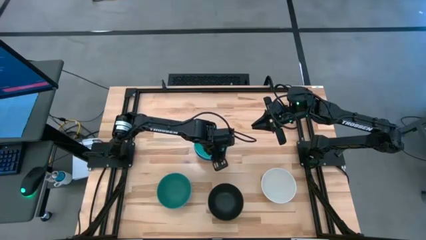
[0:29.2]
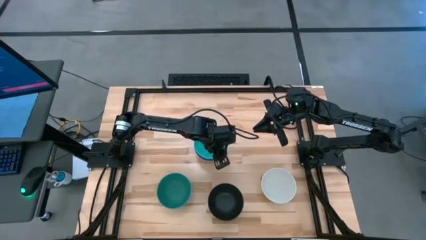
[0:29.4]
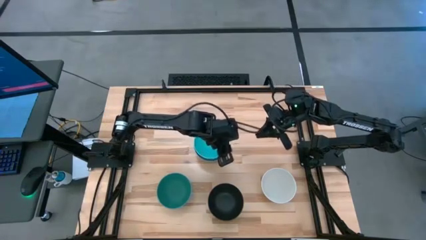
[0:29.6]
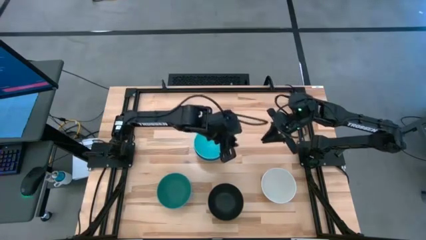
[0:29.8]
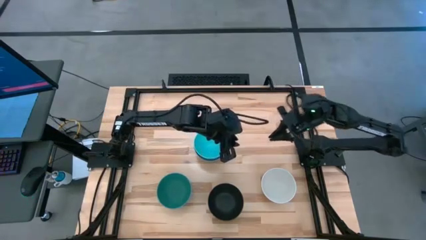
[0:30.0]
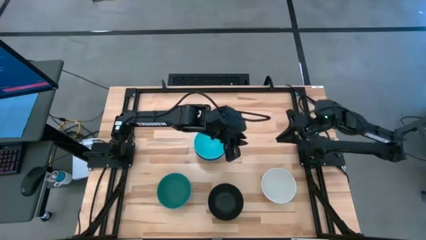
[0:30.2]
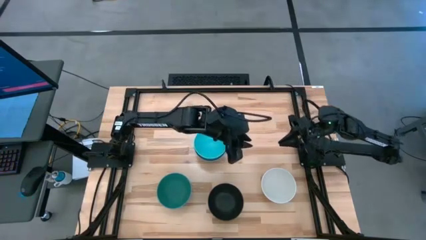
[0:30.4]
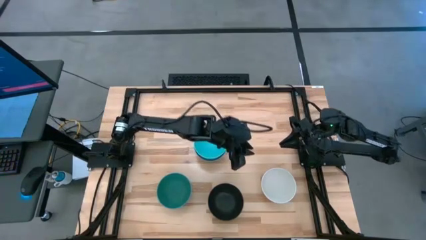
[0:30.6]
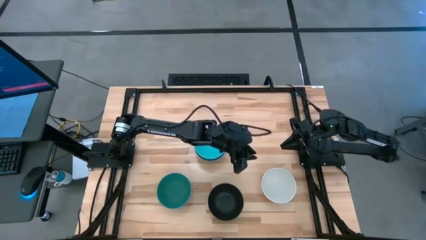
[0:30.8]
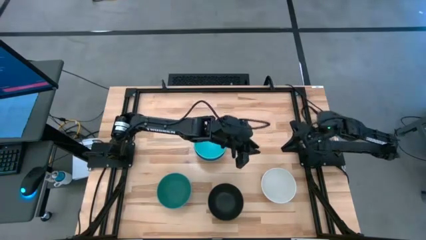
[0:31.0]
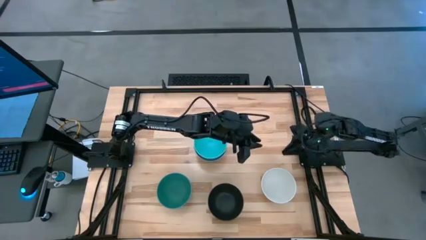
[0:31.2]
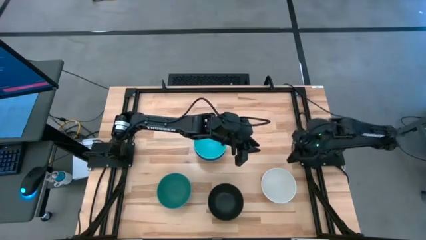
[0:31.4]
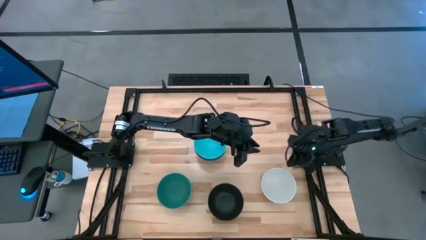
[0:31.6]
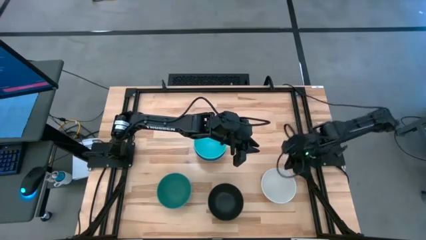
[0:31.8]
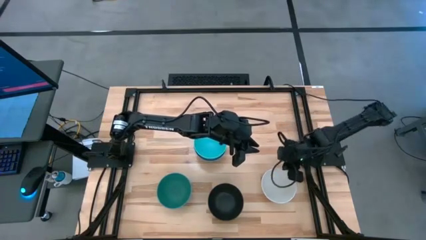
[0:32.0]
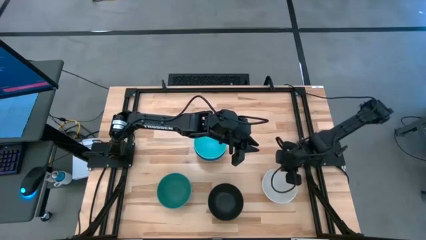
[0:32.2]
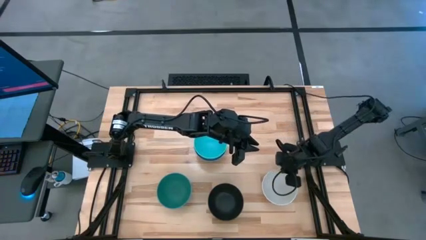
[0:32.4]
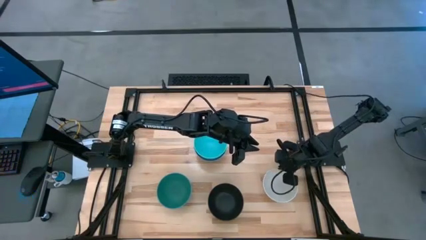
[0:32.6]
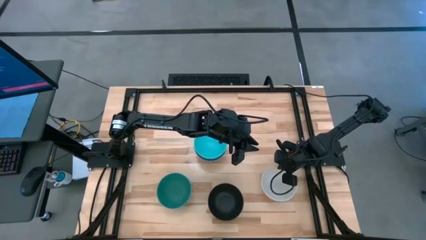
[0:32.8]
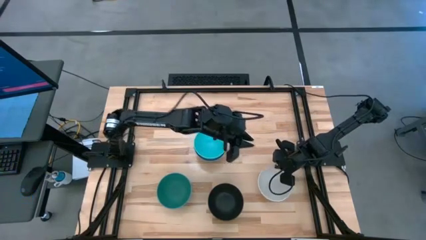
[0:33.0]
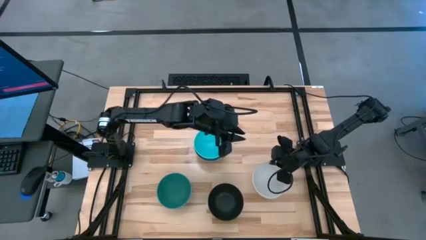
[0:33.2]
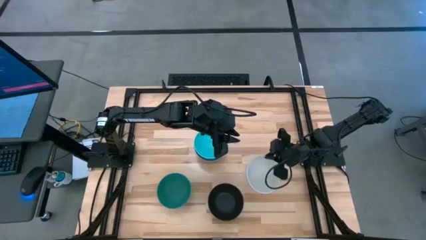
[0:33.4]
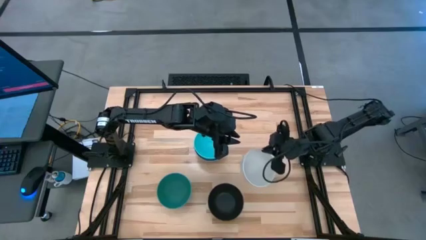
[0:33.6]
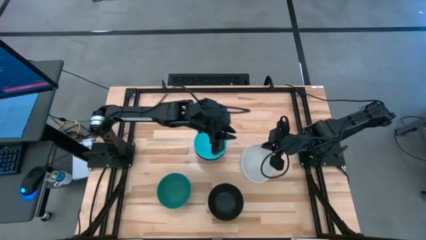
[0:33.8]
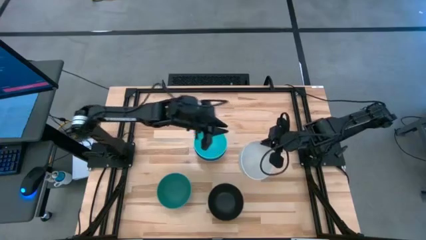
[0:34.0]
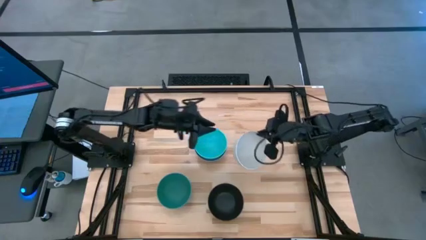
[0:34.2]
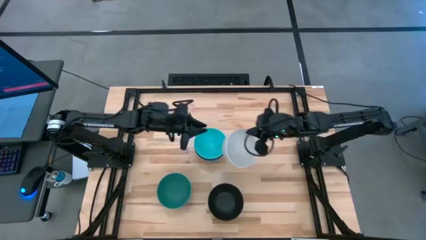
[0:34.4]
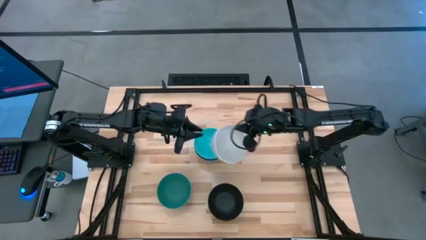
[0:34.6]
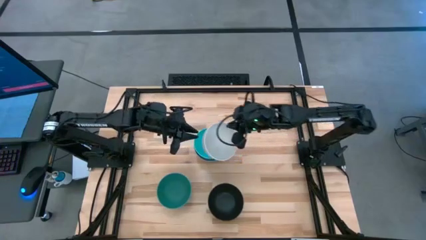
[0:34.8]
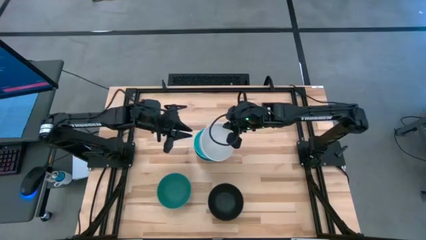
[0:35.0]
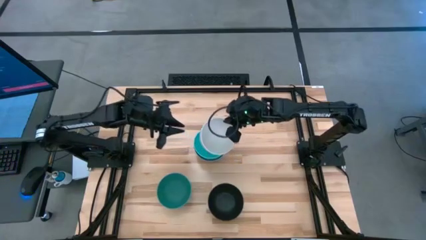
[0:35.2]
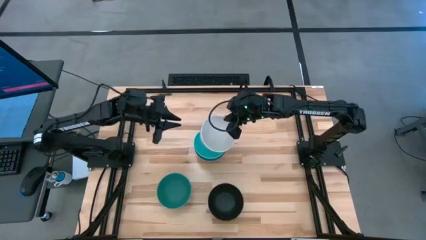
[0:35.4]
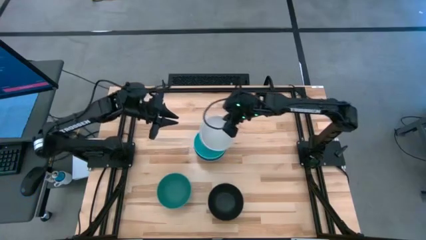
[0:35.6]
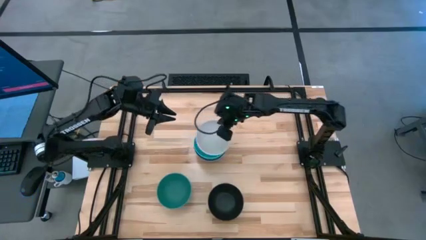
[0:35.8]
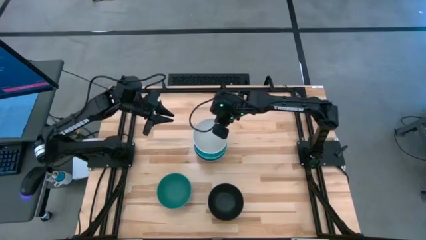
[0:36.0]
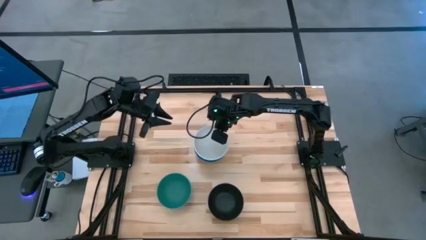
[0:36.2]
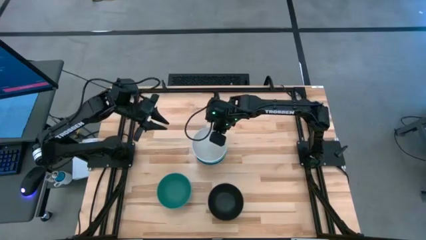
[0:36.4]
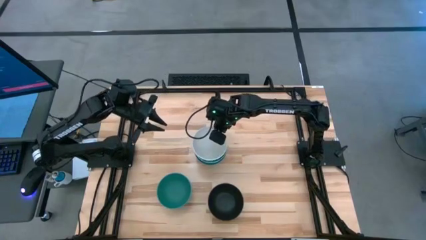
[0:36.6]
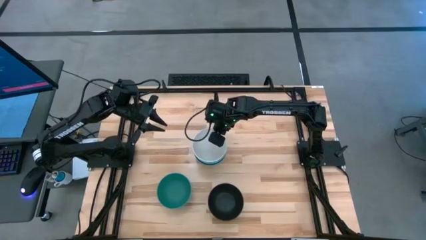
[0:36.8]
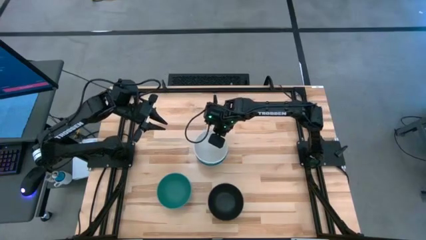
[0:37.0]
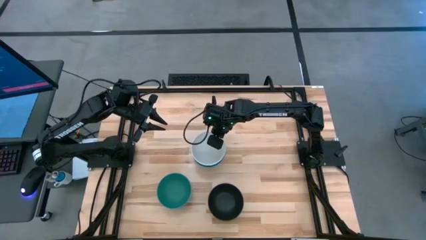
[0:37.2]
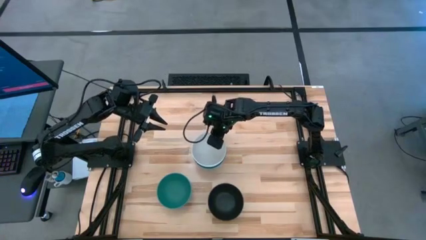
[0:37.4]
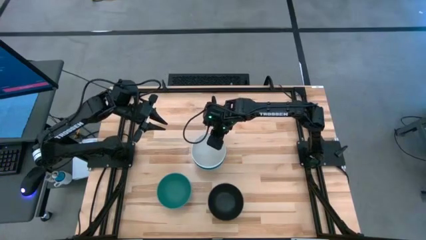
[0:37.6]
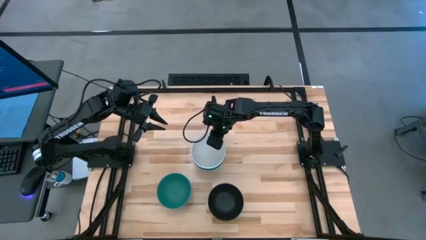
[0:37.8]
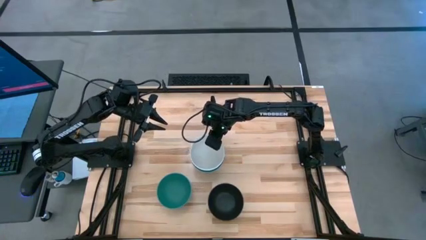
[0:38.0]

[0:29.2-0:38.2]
Task: Nest bowls inside each other
Stack the white bowl on top of the light blue bowl

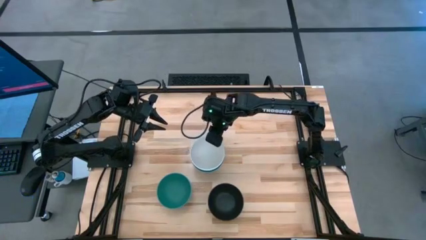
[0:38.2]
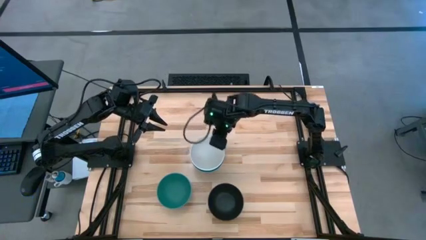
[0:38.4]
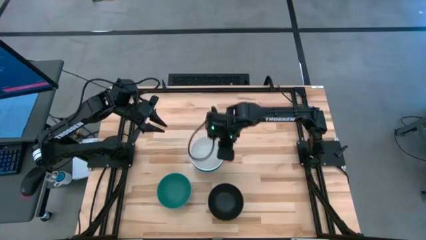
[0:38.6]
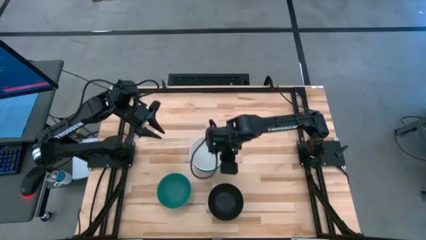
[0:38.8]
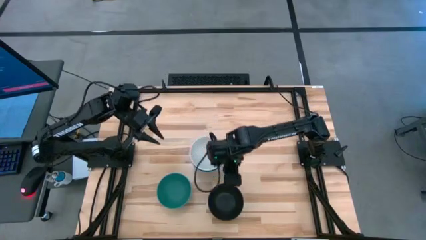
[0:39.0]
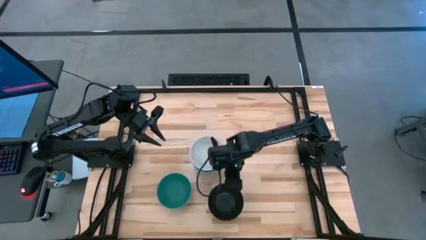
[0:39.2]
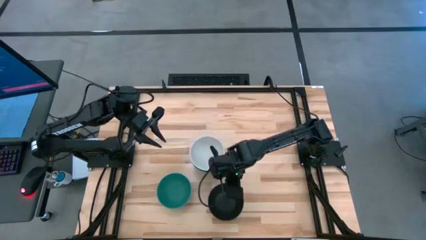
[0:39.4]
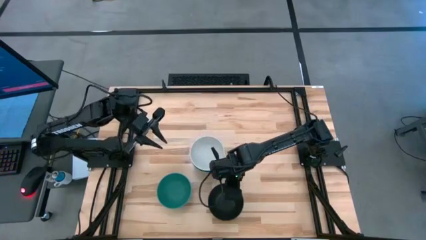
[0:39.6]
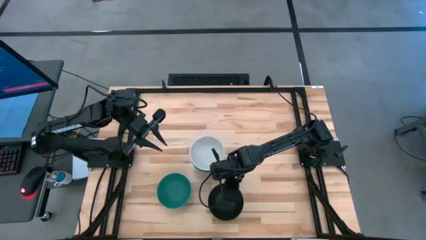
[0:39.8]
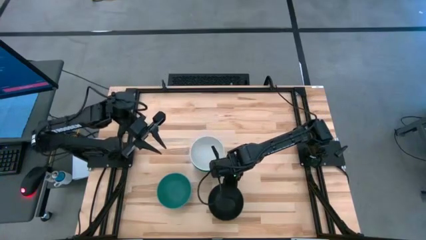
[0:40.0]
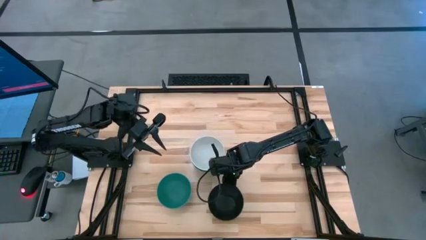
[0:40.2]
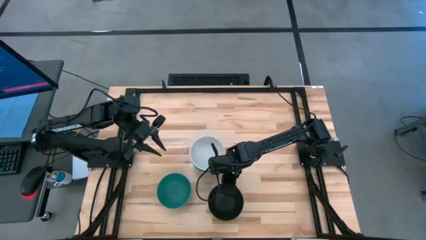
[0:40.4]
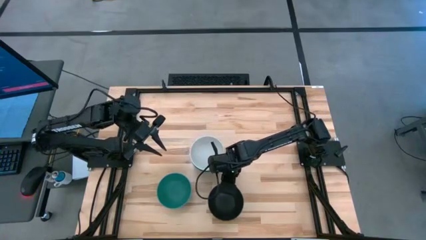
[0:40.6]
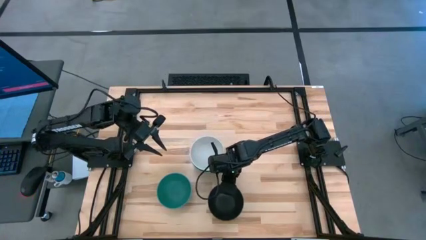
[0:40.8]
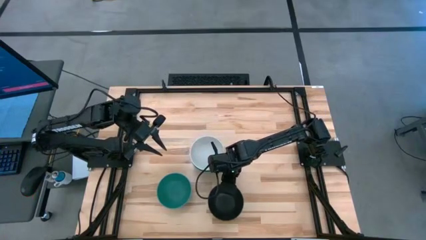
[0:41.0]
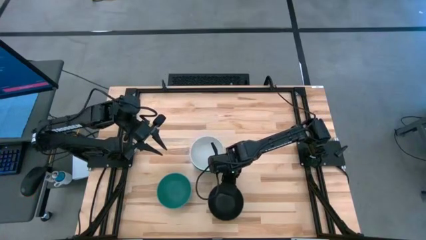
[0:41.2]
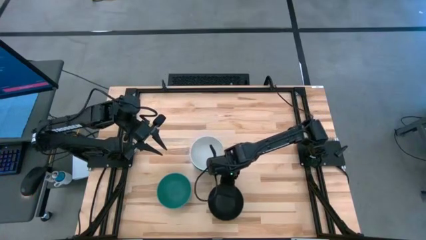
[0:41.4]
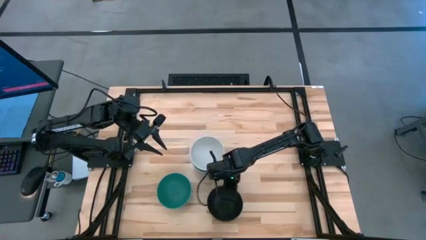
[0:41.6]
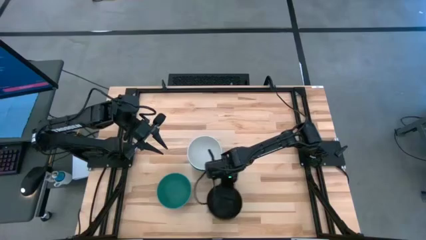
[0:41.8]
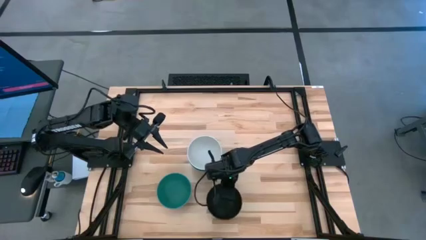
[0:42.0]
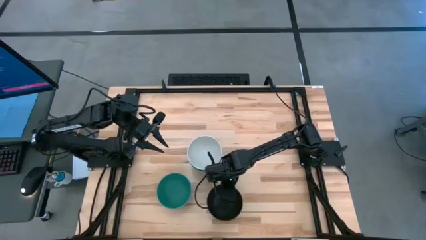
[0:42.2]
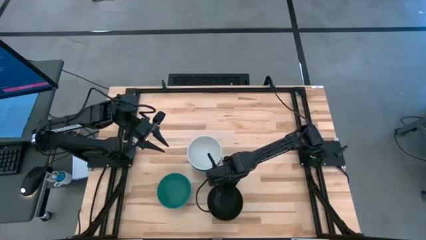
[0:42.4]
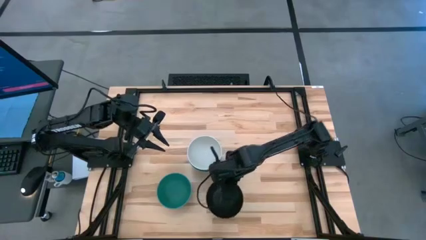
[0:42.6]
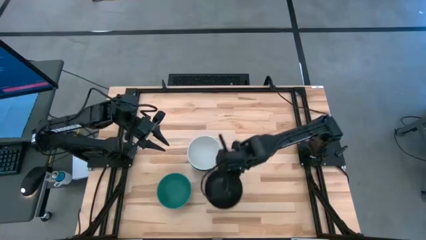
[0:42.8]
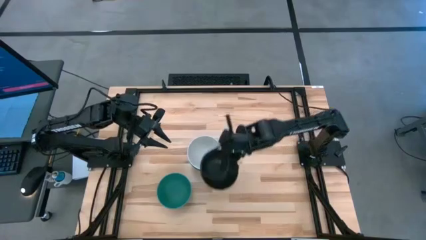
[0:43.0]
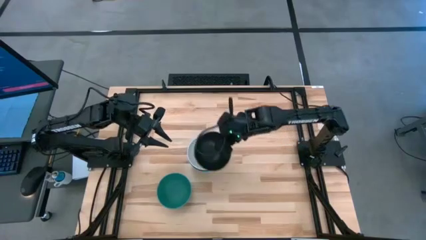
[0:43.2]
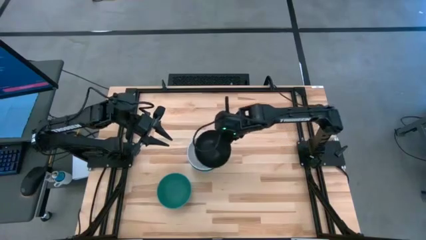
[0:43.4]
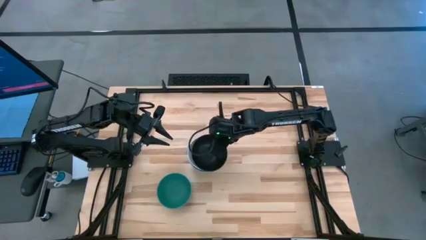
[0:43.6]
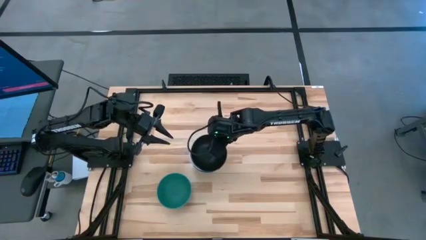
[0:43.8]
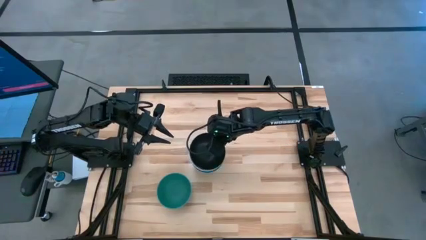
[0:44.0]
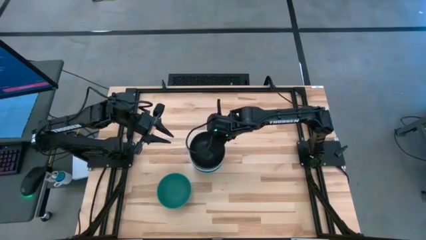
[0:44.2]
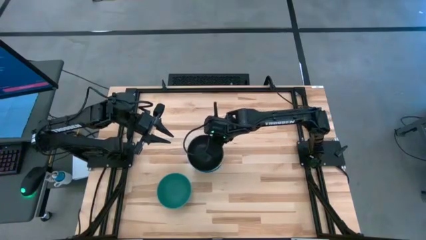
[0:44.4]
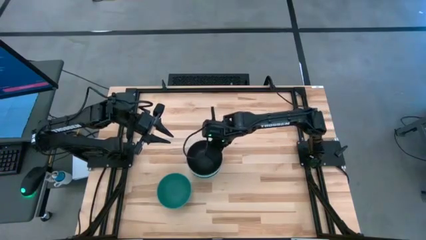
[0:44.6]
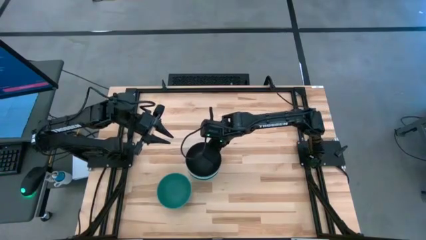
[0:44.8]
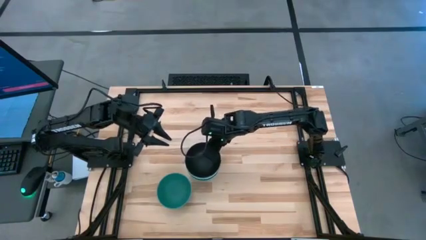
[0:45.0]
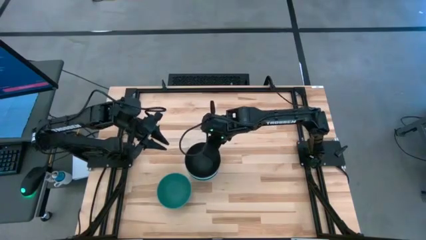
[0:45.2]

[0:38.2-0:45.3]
Stack the black bowl on top of the white bowl

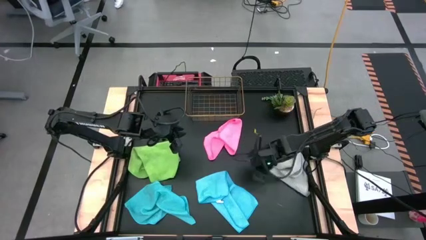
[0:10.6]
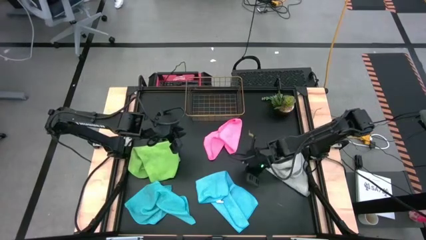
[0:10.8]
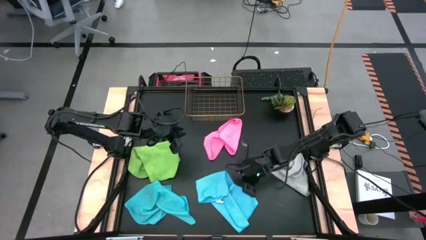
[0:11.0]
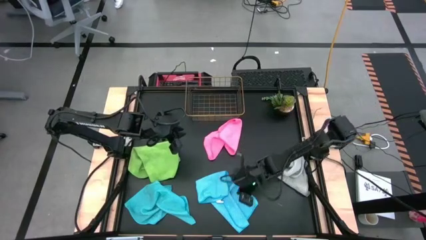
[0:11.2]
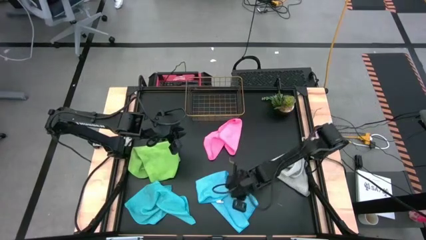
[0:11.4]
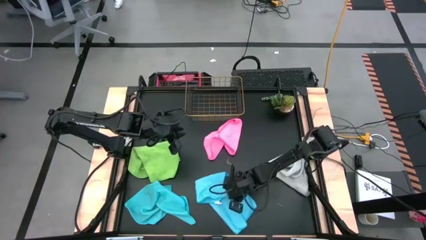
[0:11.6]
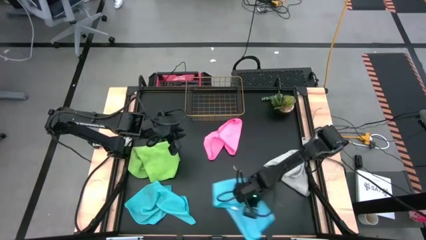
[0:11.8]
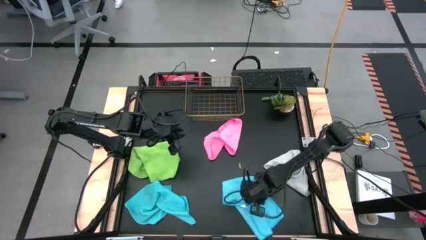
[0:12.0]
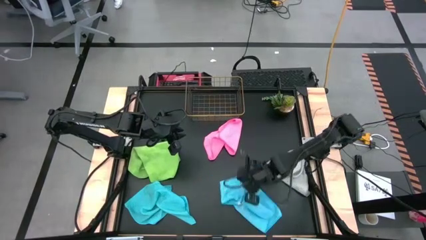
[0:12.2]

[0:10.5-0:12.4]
Task: Fold microfiber towels
Adjust the right light blue microfiber cloth
